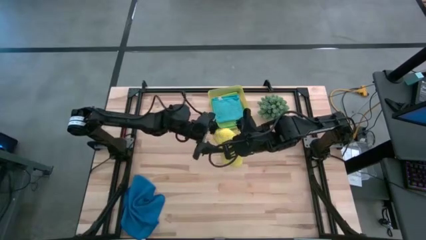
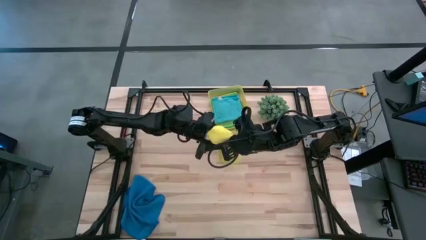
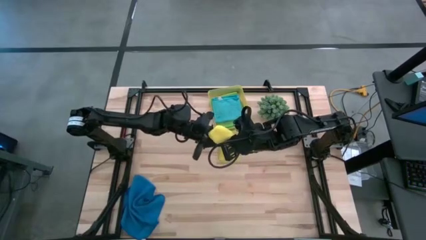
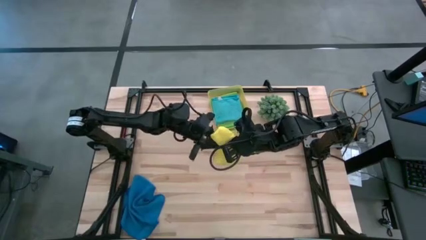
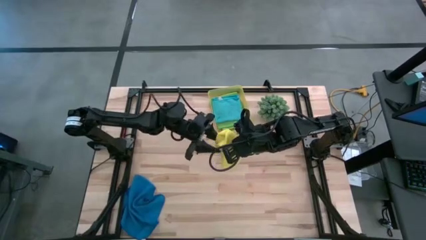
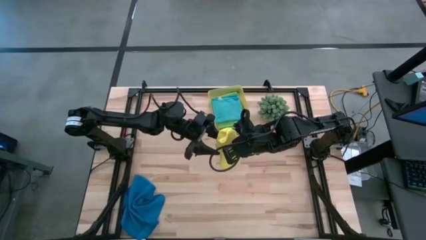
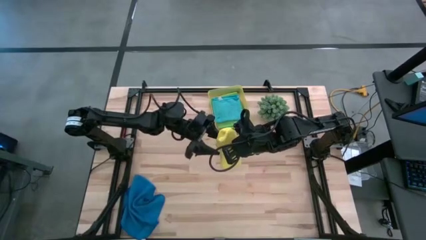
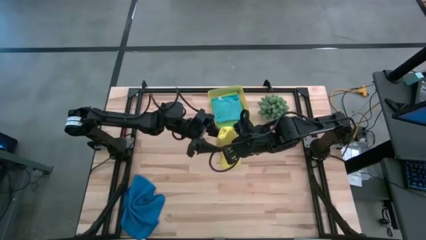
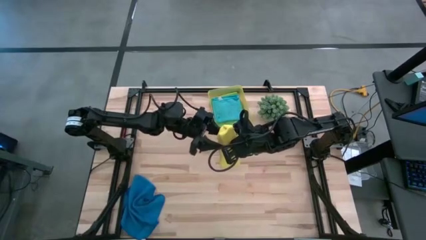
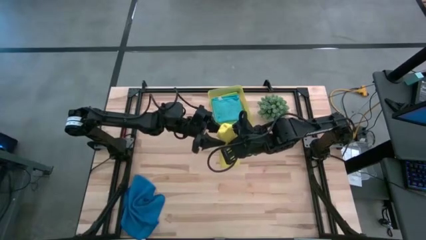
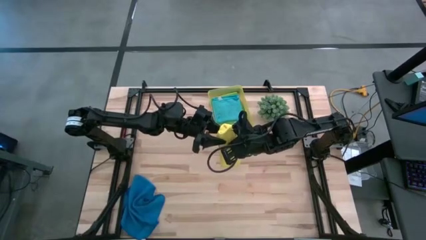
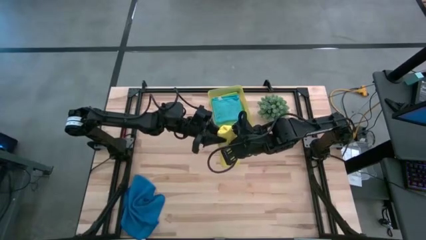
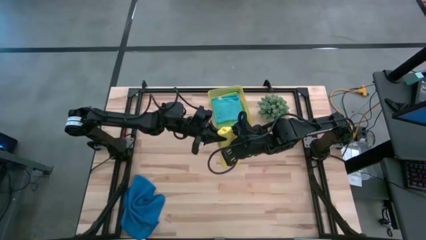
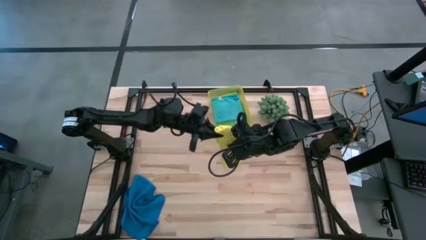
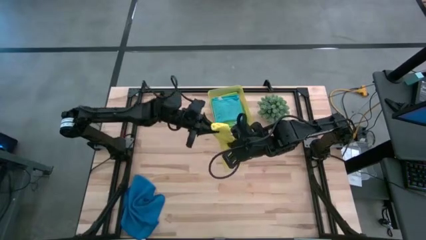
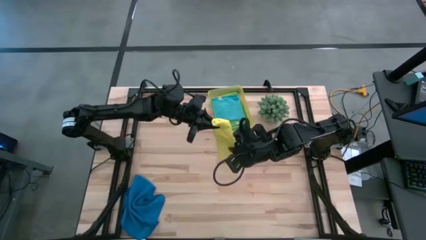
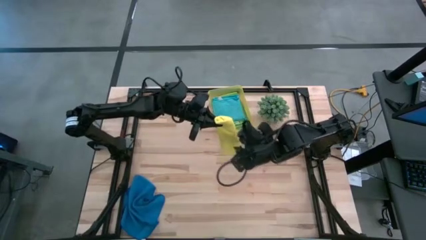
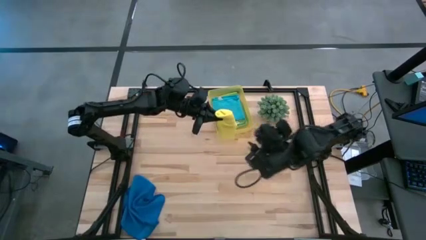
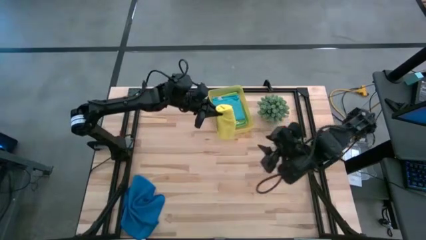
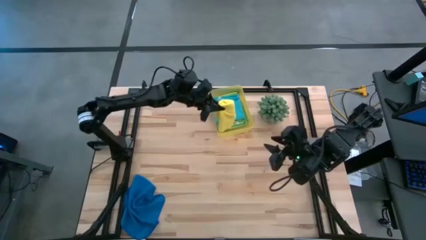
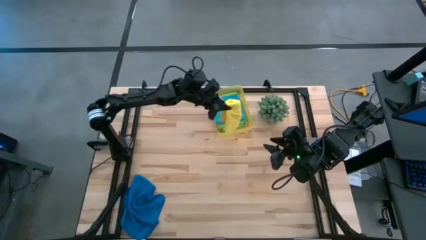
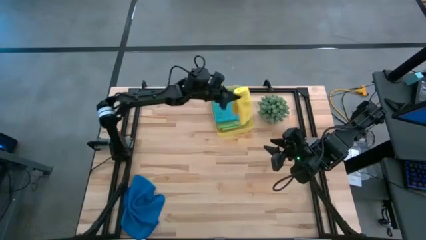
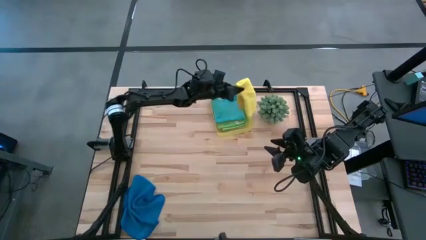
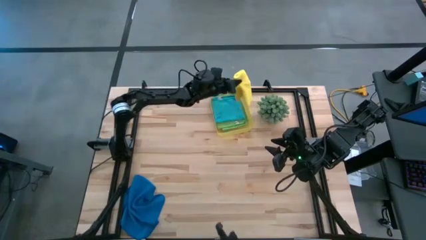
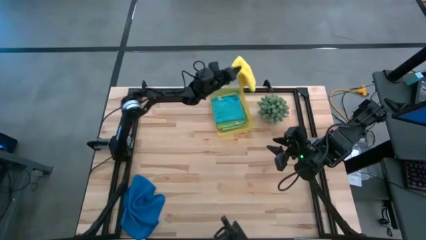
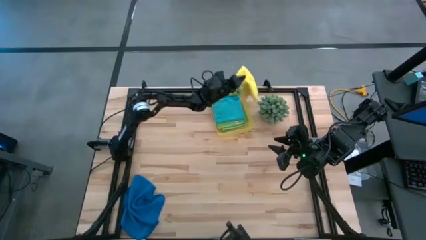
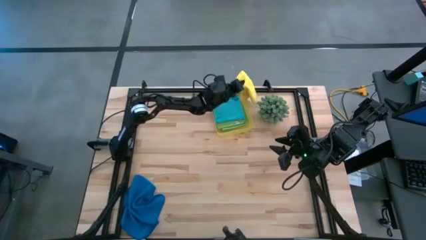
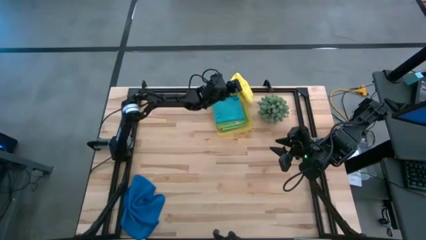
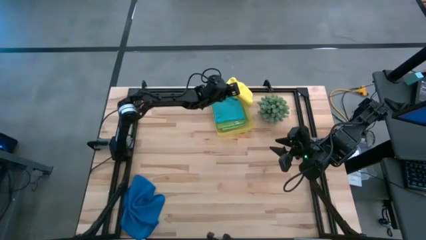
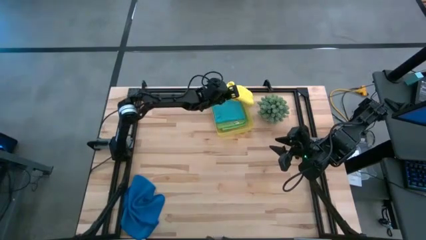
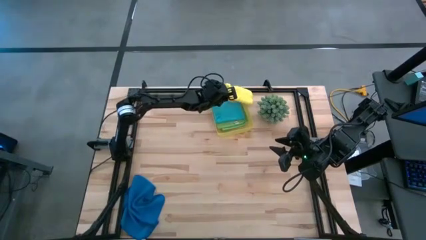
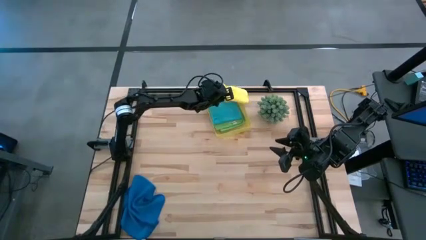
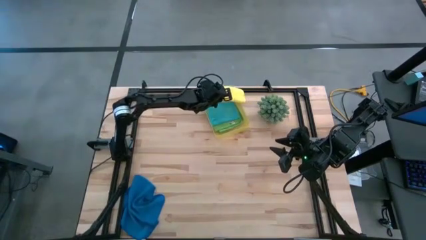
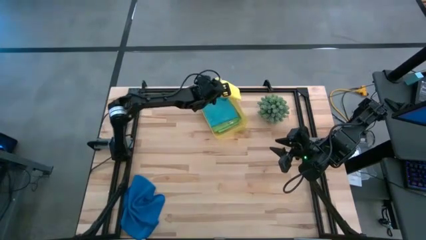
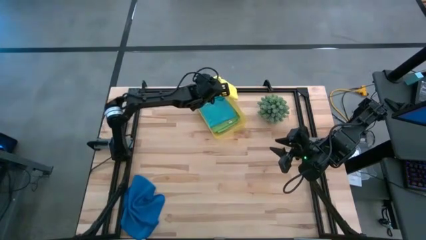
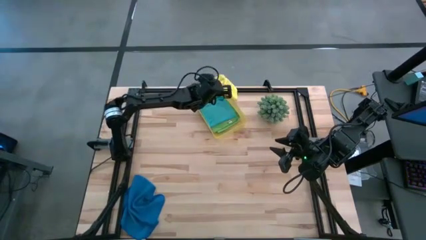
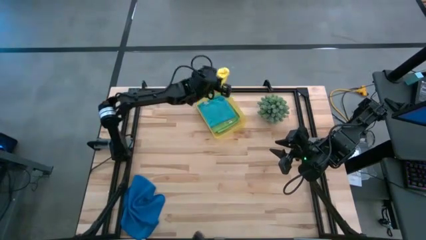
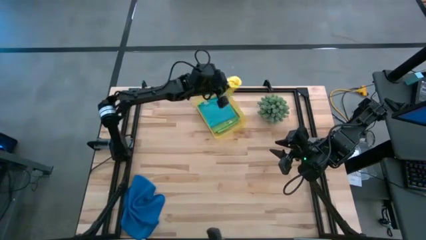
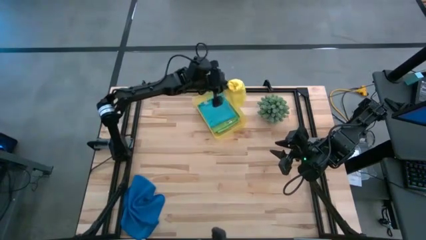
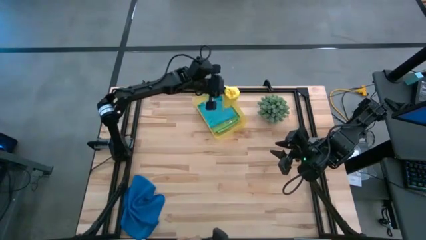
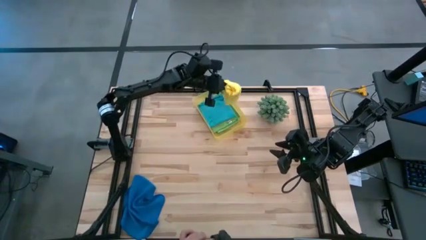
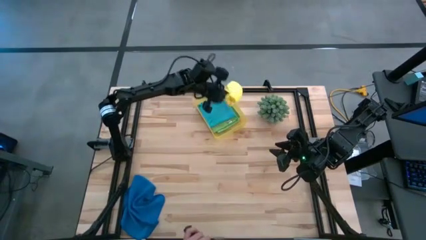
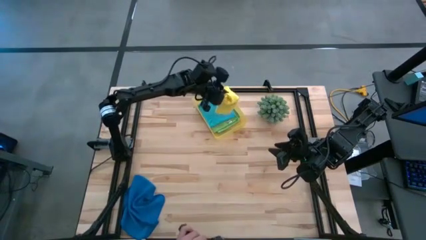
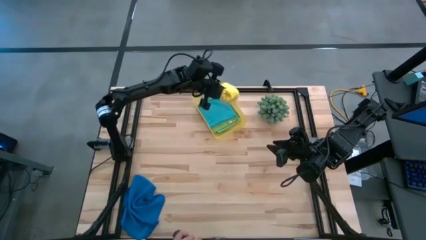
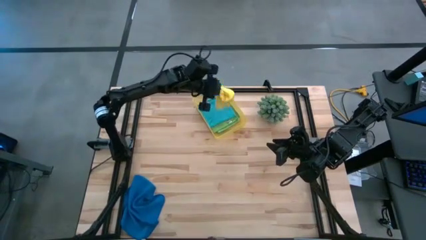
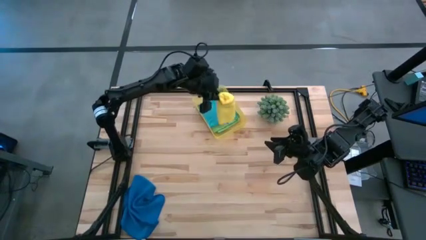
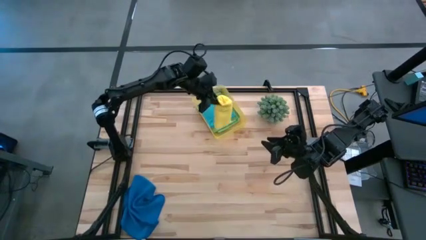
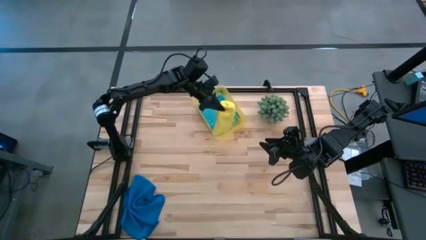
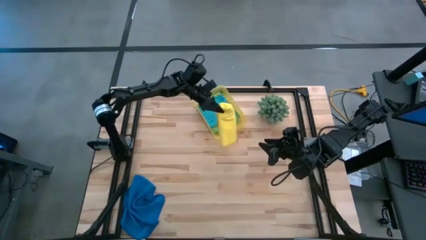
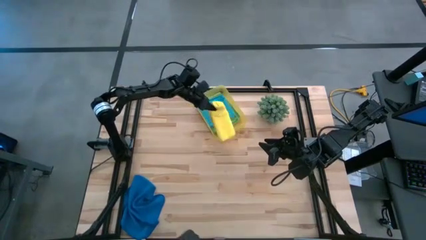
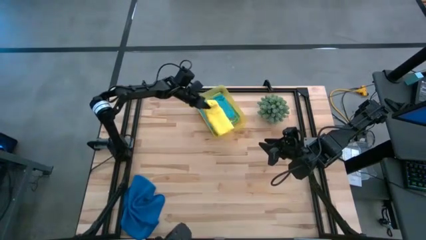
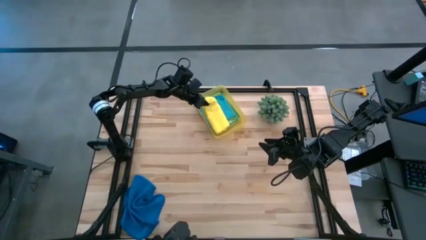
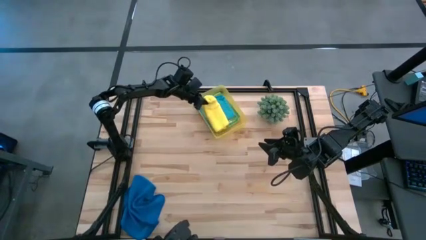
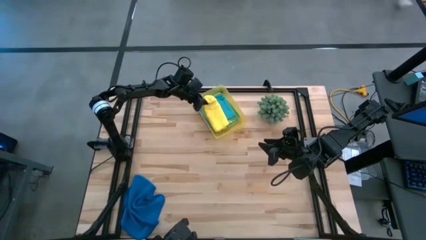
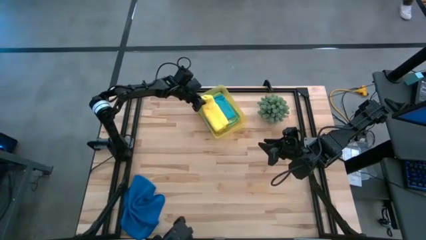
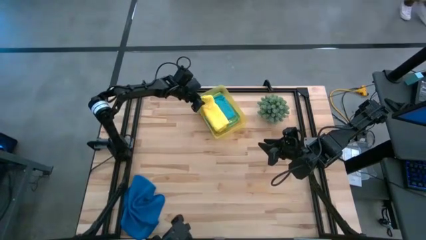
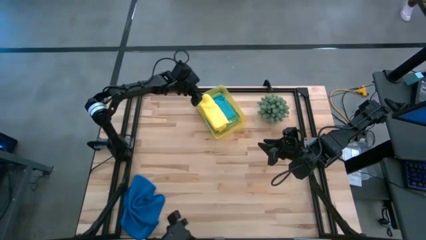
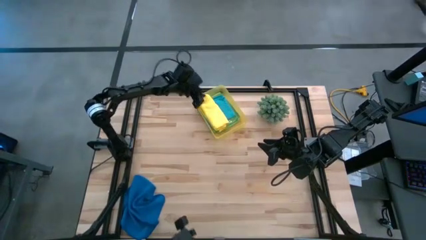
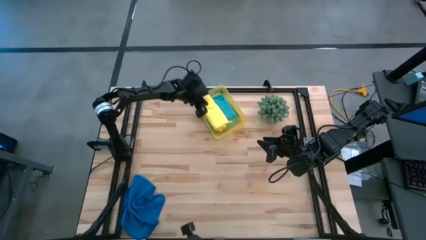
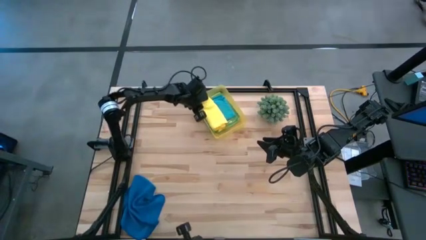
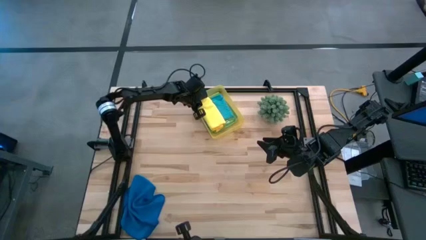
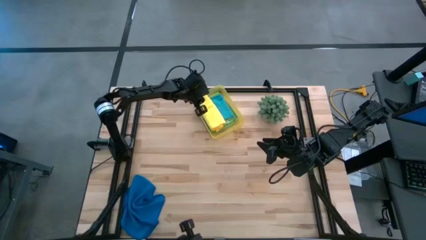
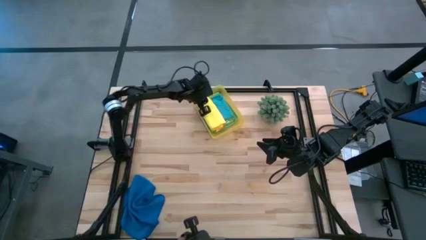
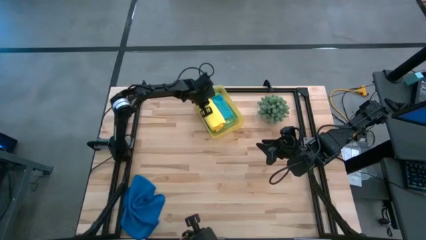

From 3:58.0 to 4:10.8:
Task: Fold microfiber towels
Put the yellow microfiber cloth into the yellow bin

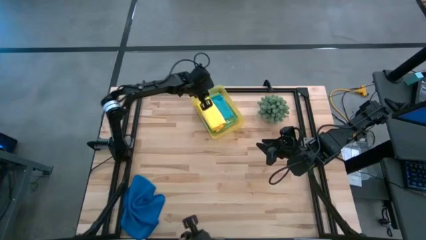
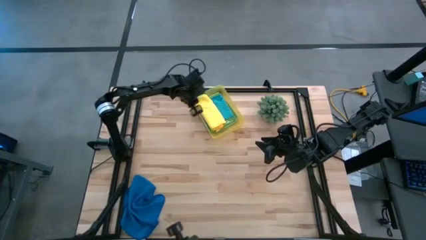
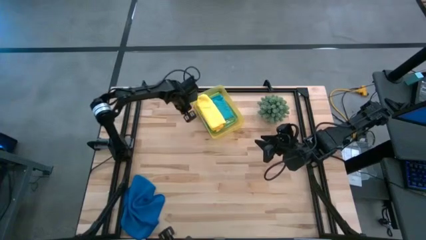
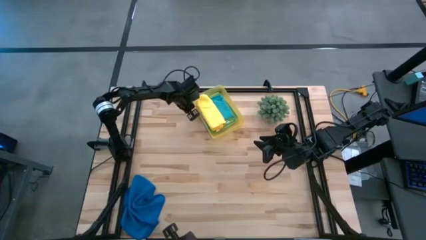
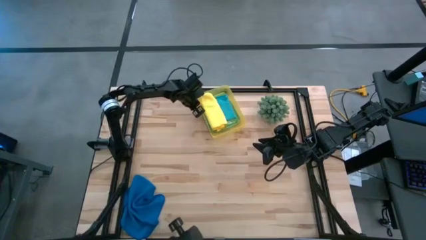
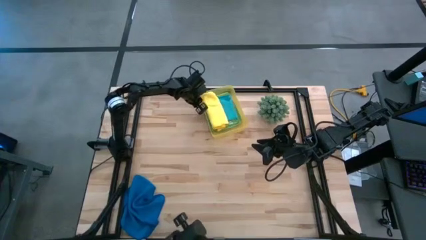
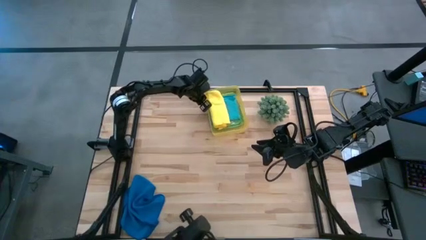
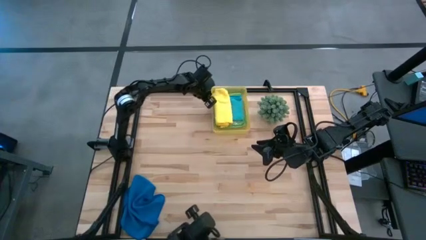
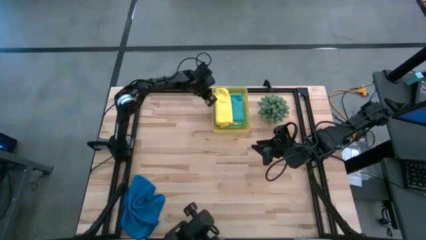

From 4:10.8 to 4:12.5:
Adjust the yellow bin

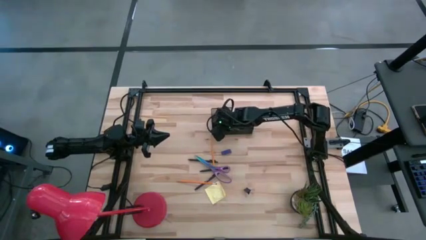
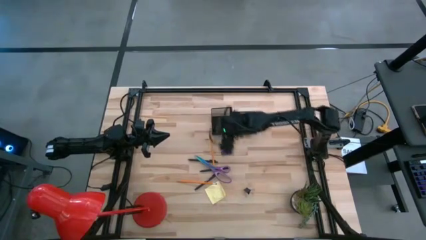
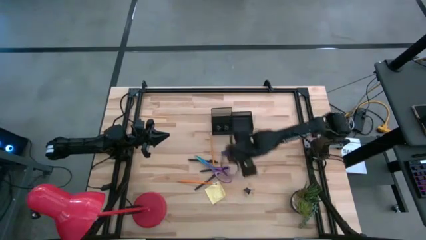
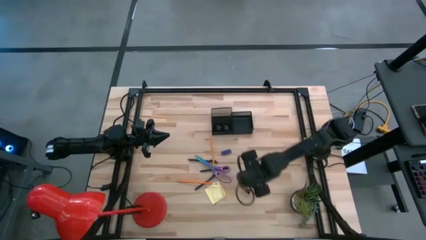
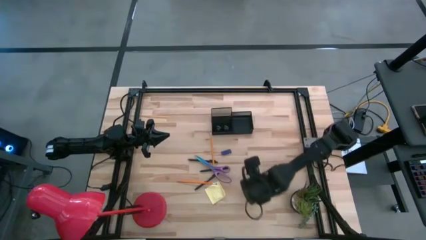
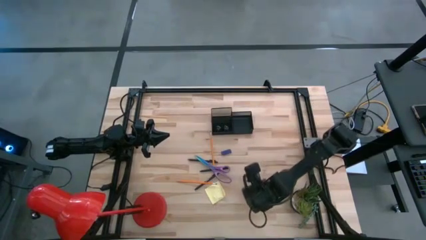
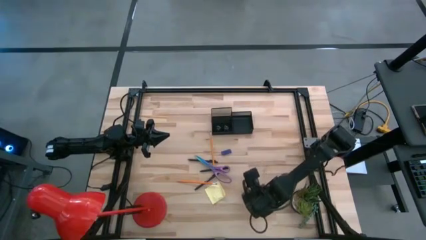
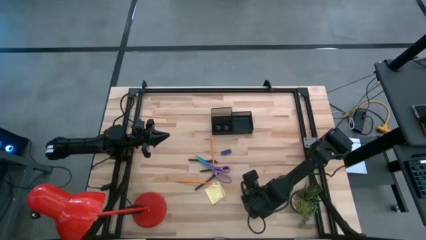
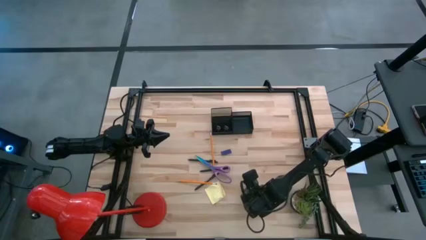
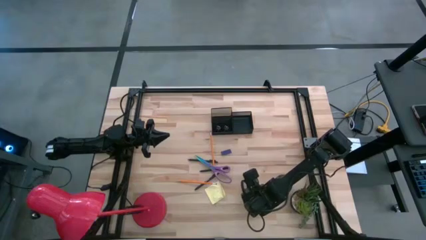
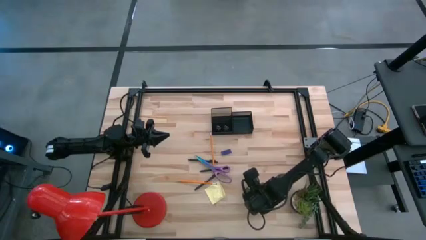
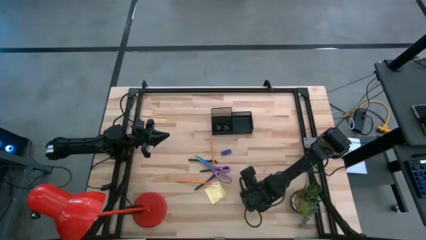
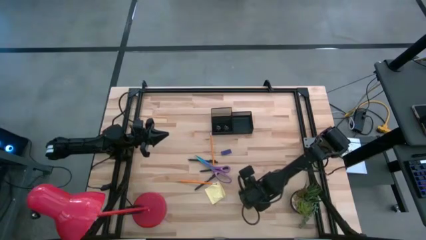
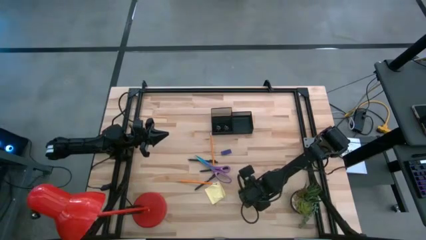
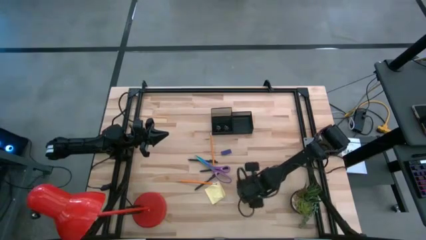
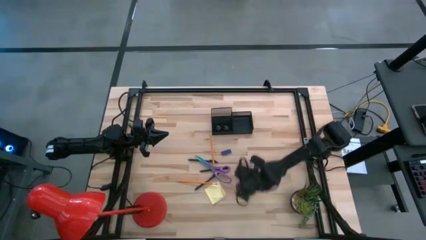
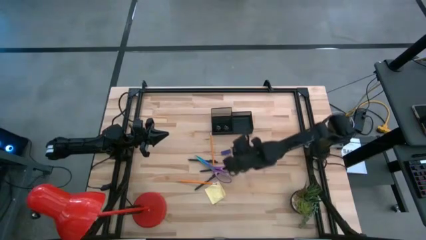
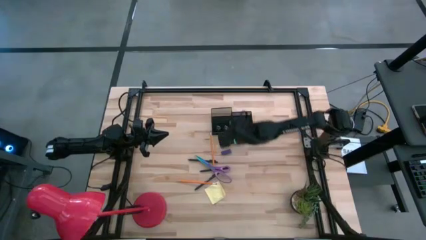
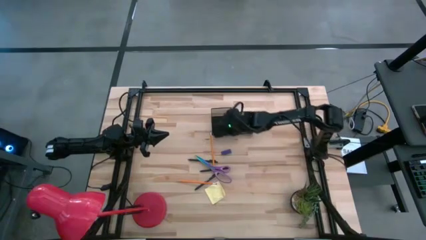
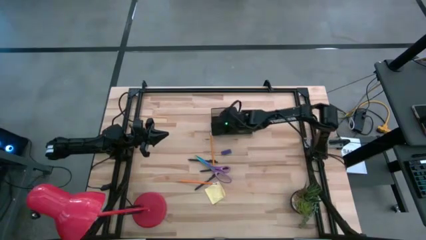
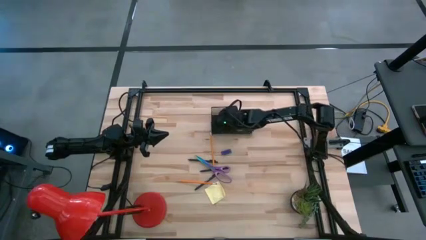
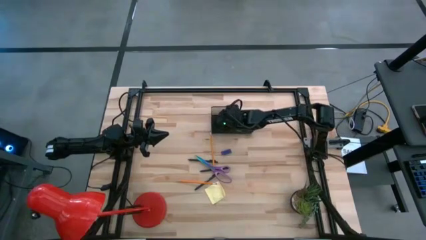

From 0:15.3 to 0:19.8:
Task: Pick and place office supplies into organizer
Put the black binder clip into the desk organizer
